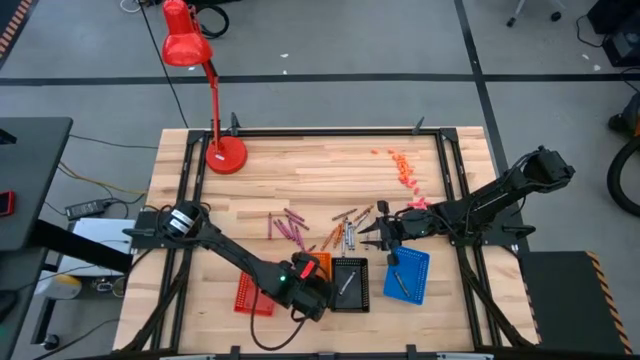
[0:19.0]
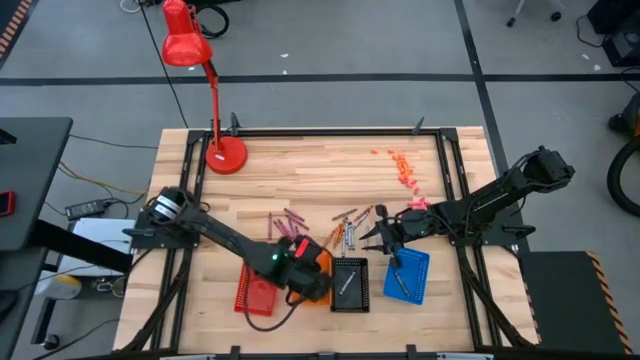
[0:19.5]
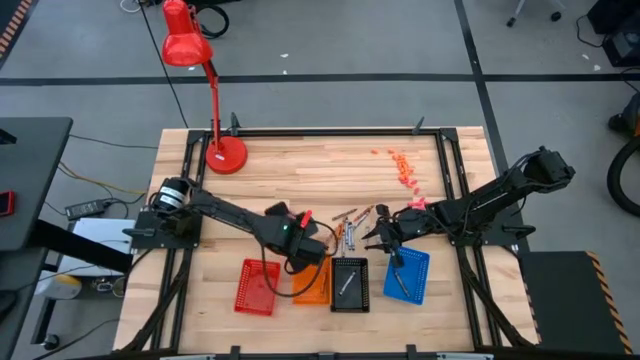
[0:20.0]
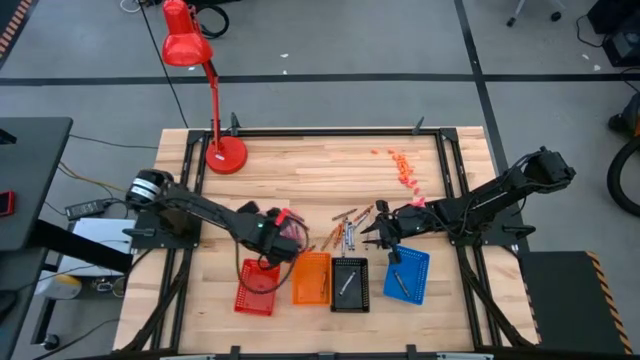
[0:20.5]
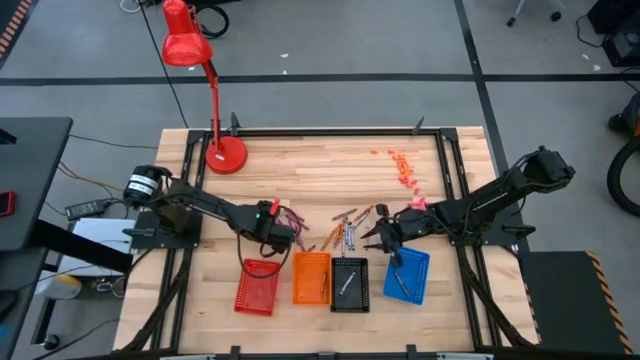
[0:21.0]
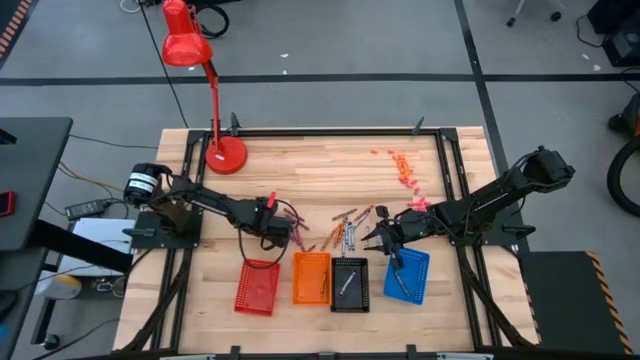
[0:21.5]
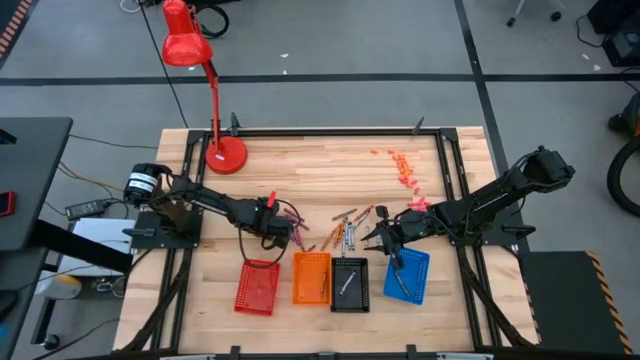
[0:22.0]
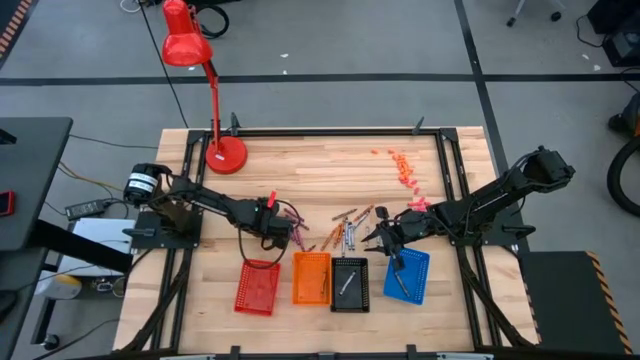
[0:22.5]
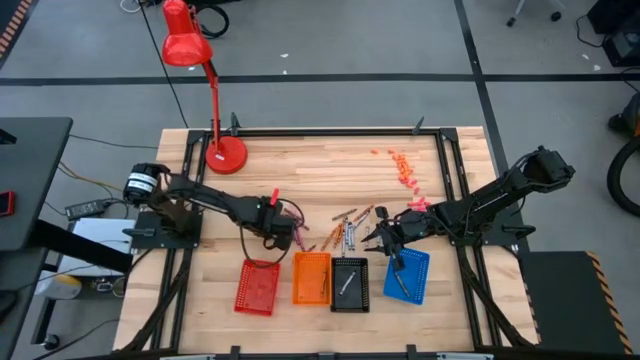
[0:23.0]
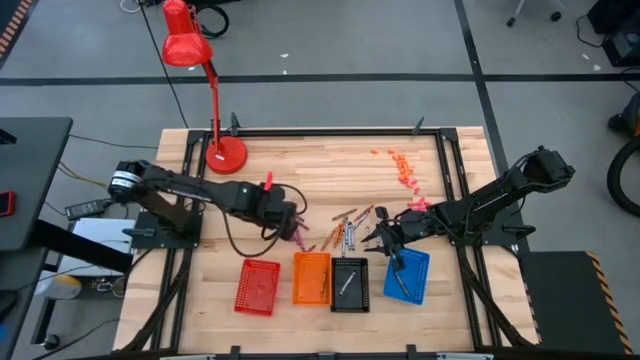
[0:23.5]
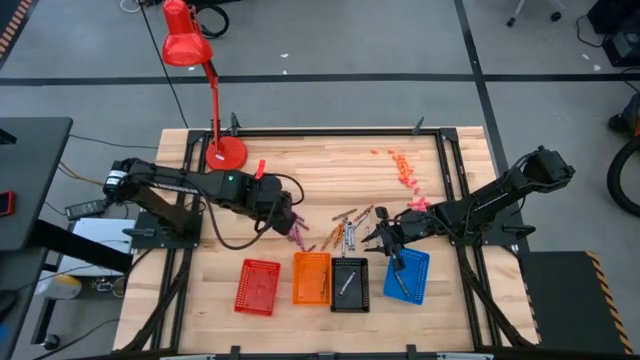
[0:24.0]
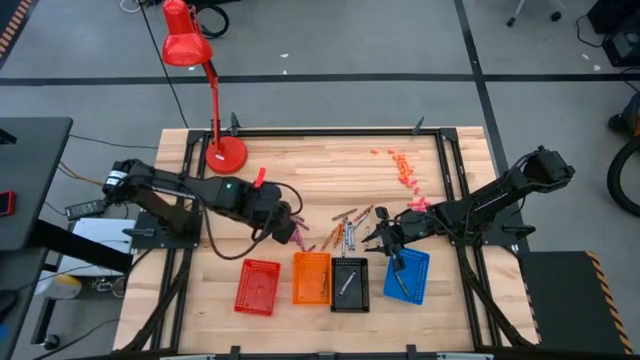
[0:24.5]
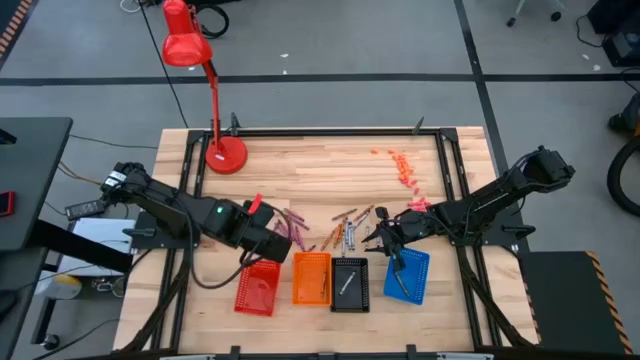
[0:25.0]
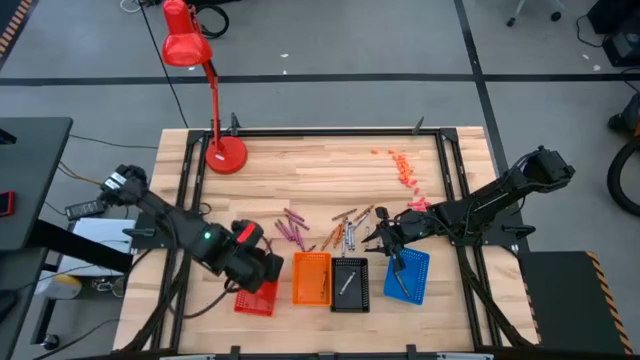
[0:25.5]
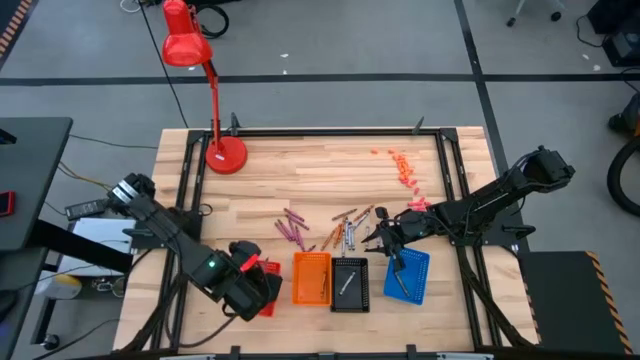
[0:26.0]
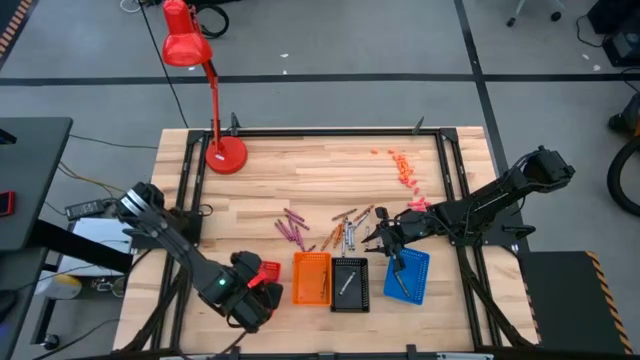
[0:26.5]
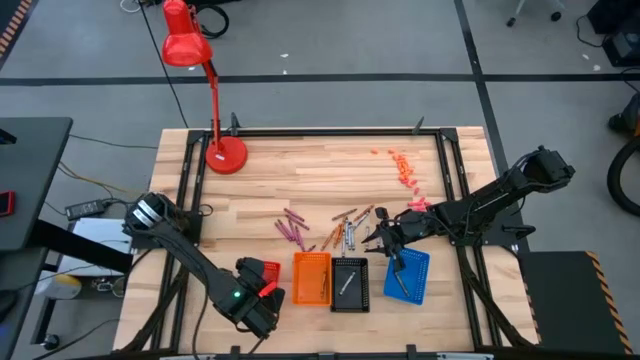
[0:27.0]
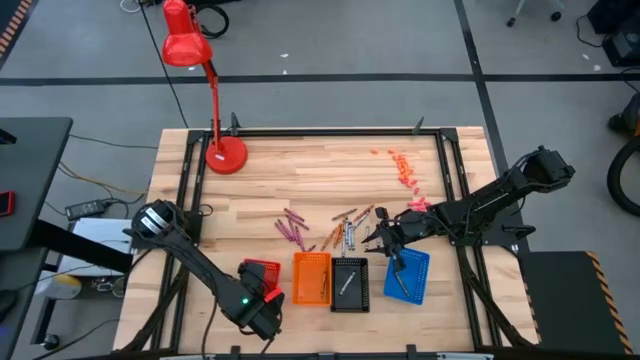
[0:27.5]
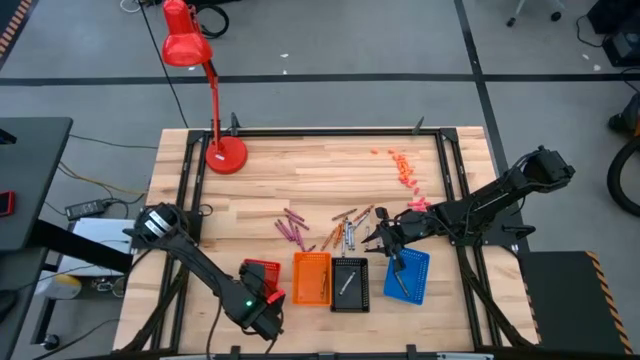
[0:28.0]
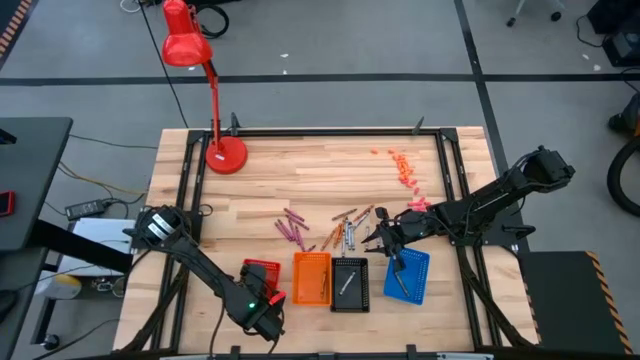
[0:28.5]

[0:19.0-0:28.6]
Task: Sort crayons
Put the violet crayon into the red bin

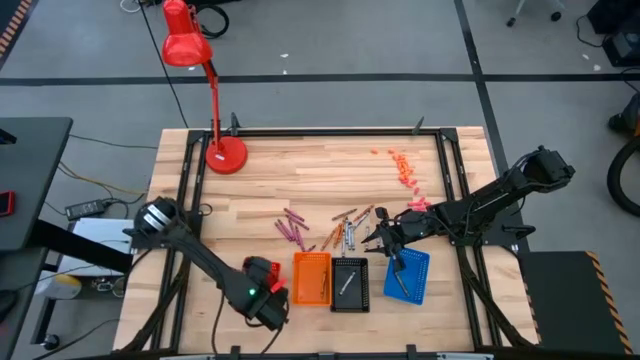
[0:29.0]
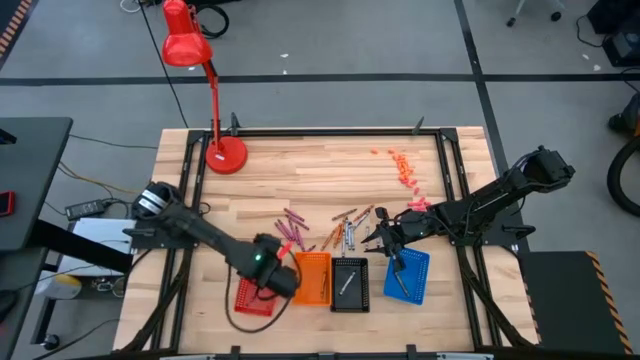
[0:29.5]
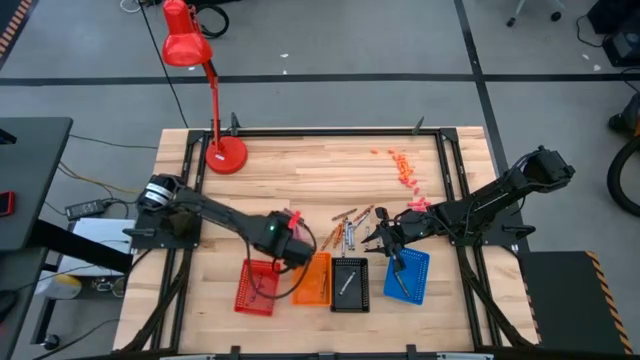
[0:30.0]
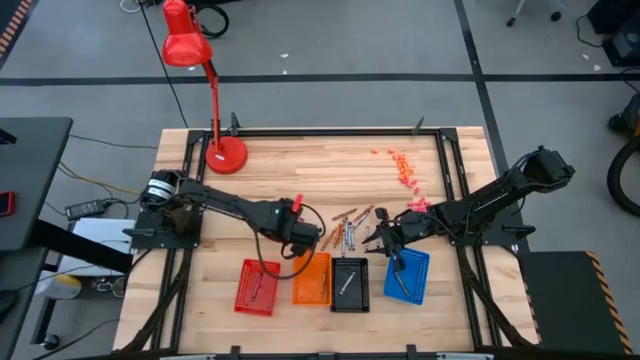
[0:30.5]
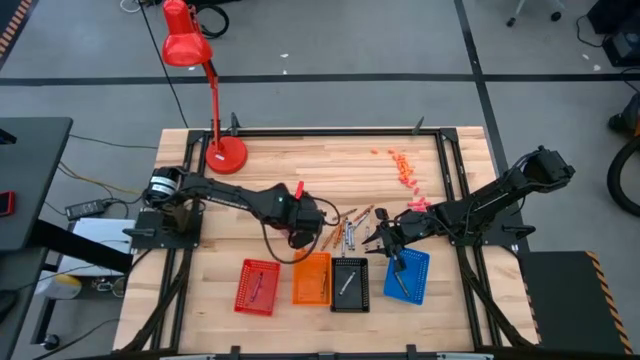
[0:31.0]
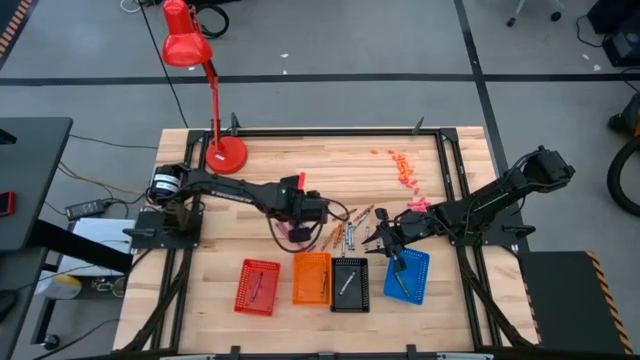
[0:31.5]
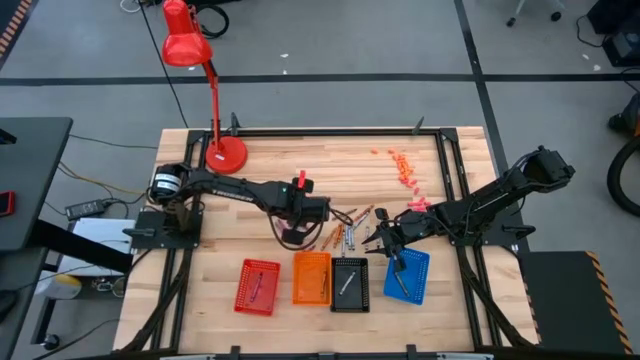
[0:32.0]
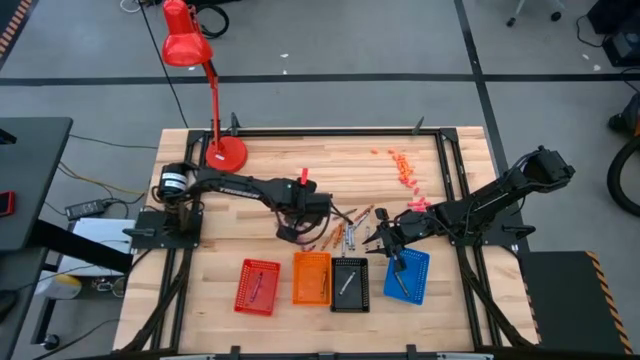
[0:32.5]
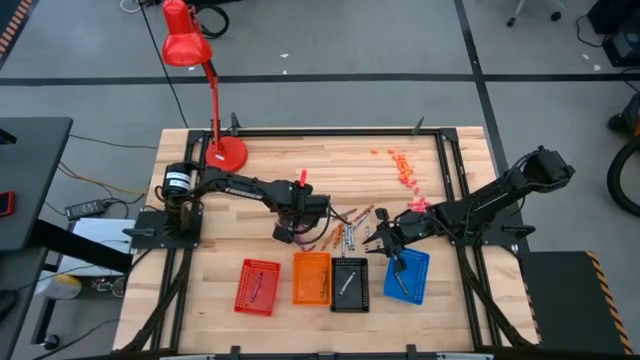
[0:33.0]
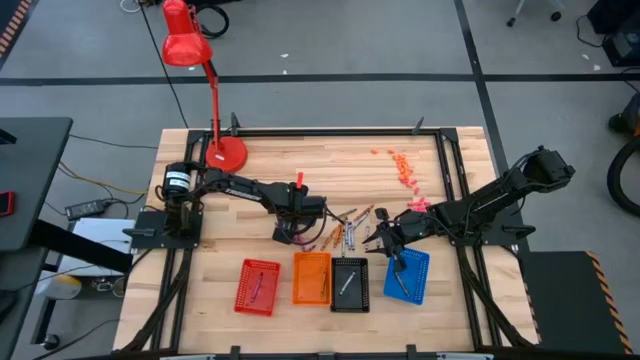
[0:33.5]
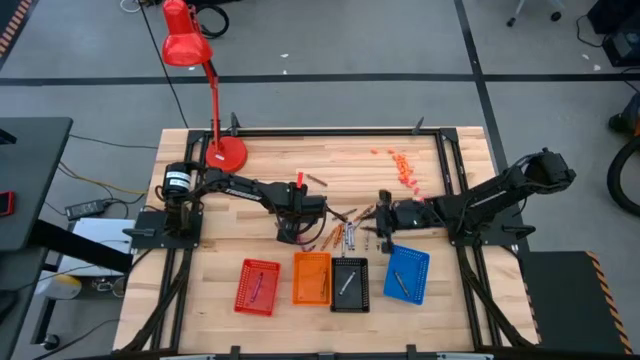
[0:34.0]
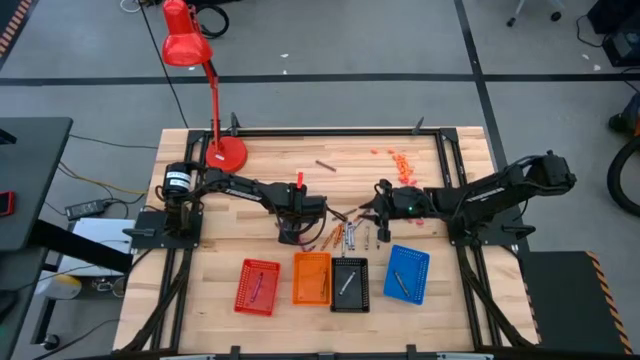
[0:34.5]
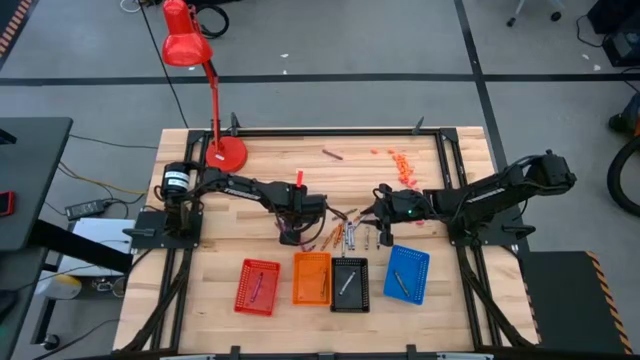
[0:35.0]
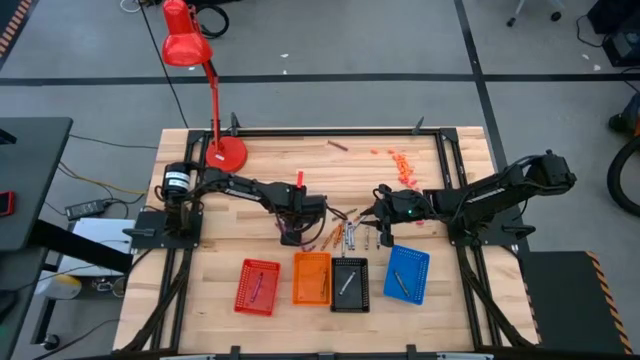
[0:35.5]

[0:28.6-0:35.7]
Put the violet crayon into the red bin

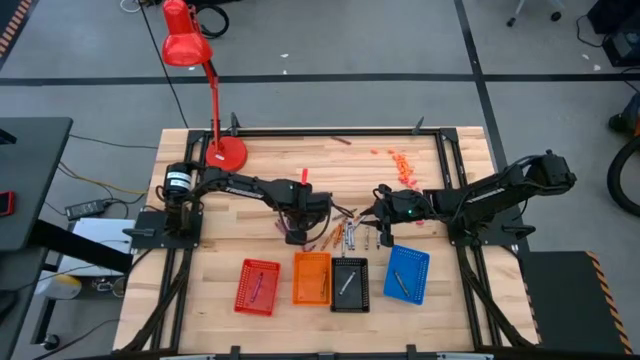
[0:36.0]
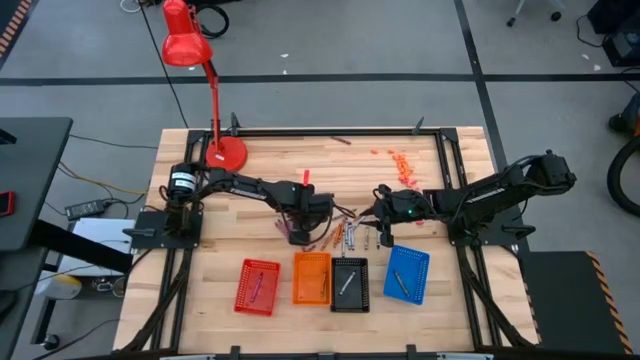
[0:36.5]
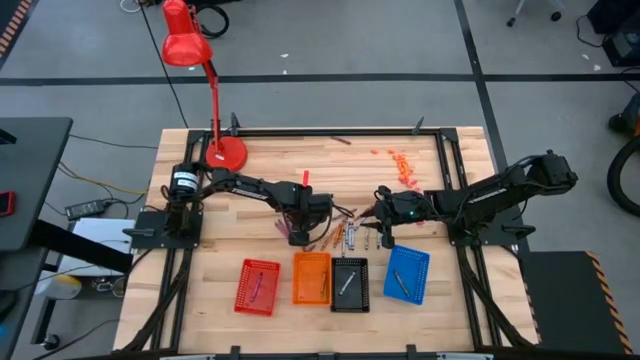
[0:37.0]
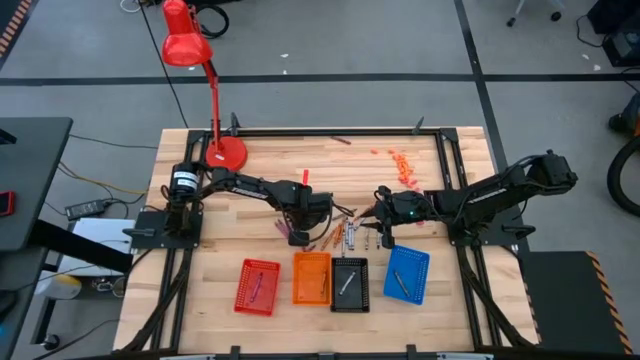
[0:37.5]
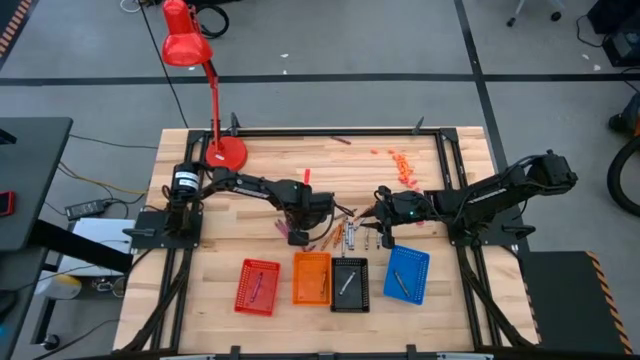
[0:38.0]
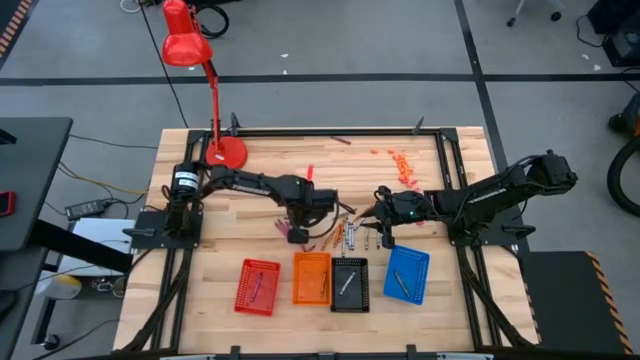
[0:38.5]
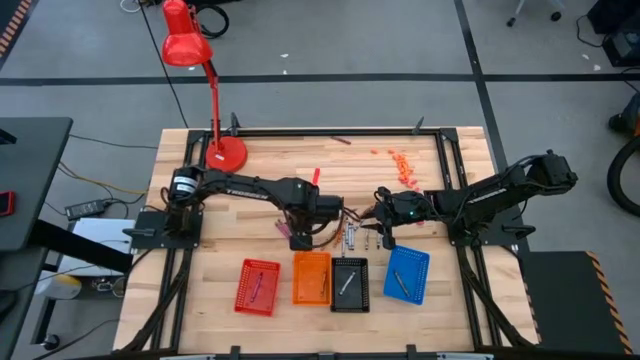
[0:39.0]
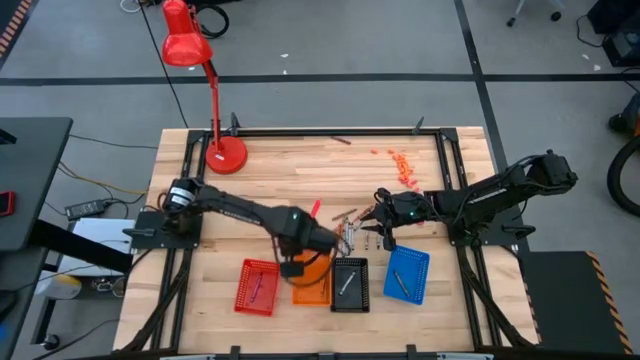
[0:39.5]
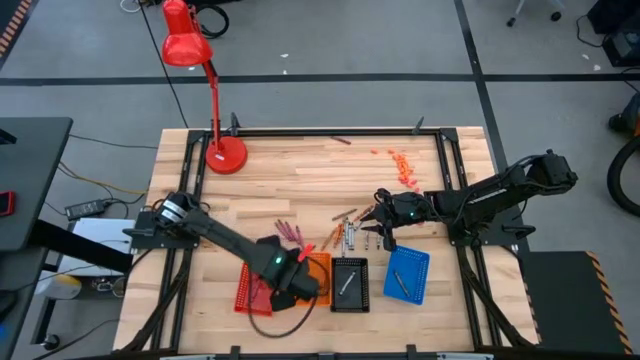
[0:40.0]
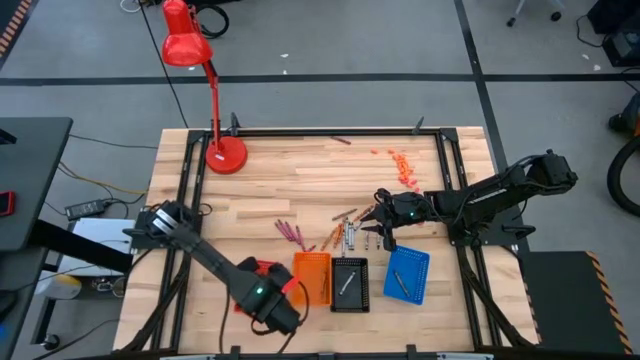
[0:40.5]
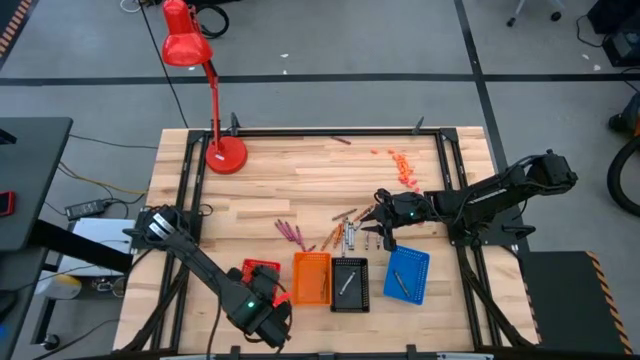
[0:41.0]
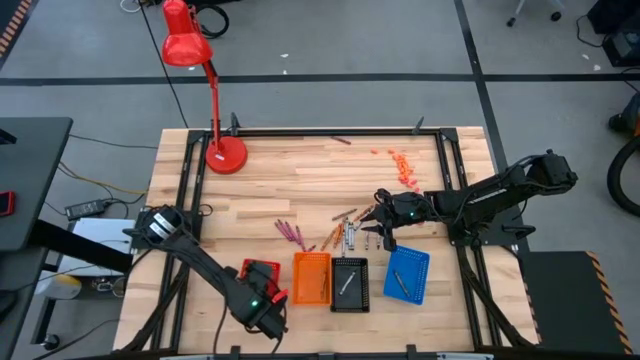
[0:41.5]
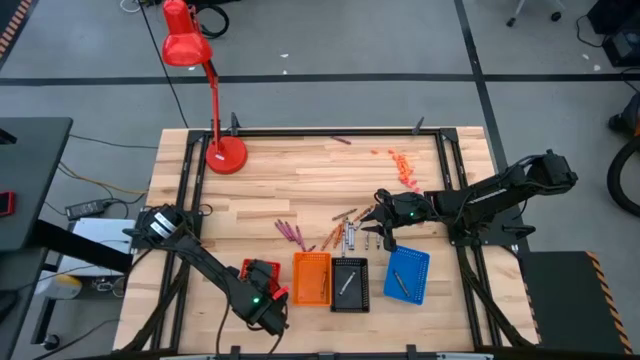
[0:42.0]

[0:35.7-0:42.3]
Put the violet crayon into the red bin
